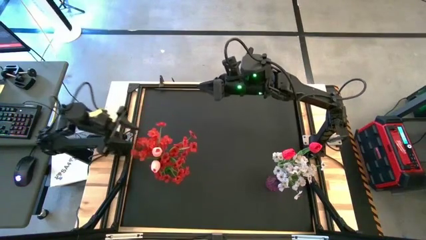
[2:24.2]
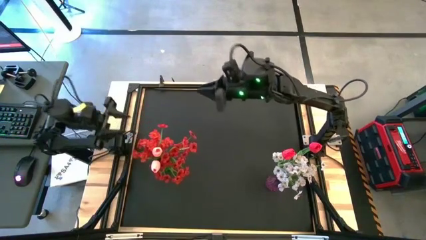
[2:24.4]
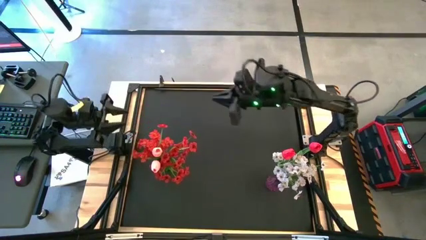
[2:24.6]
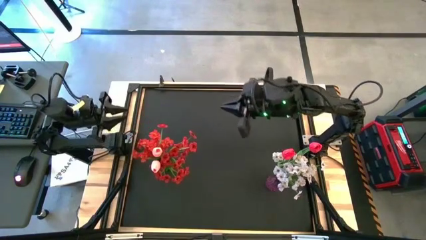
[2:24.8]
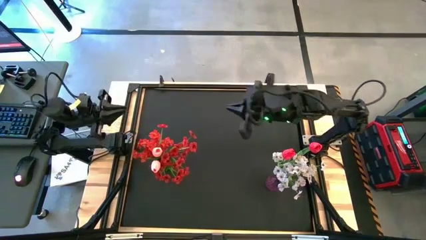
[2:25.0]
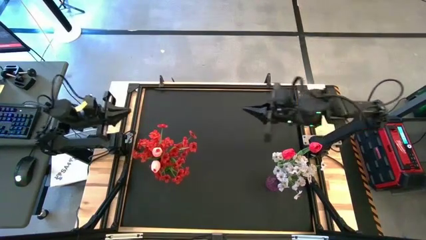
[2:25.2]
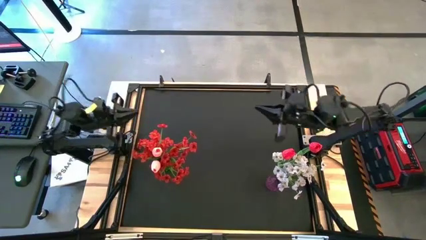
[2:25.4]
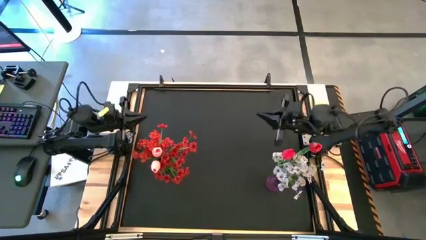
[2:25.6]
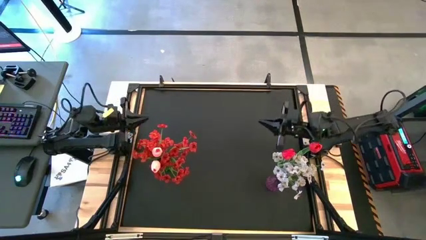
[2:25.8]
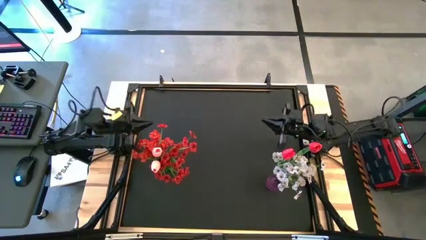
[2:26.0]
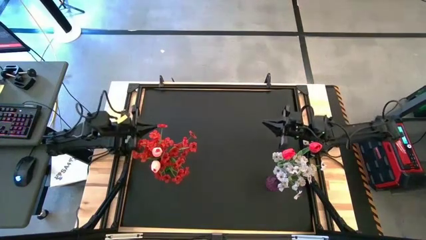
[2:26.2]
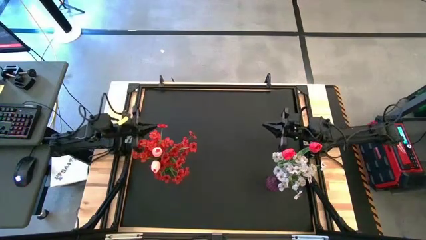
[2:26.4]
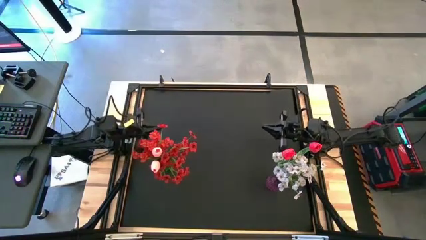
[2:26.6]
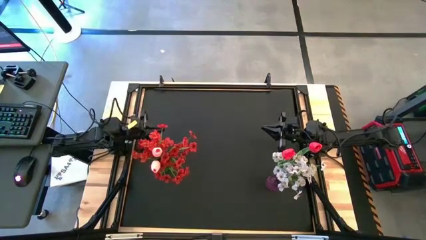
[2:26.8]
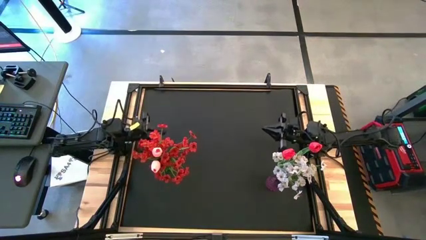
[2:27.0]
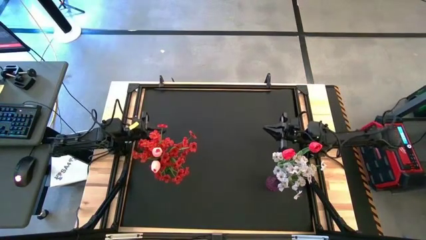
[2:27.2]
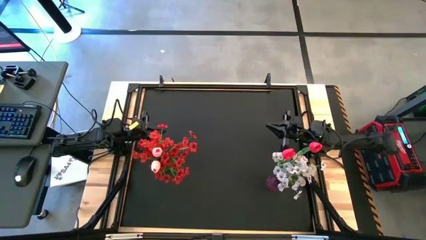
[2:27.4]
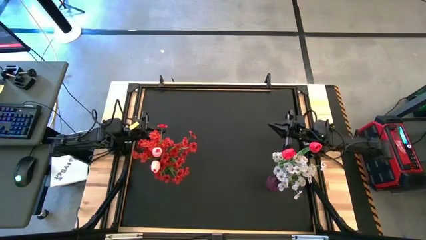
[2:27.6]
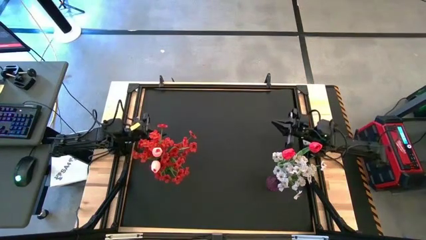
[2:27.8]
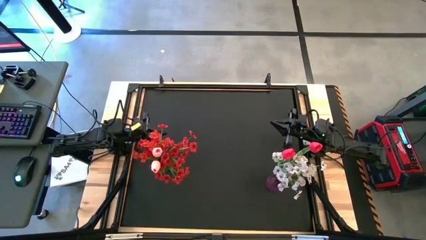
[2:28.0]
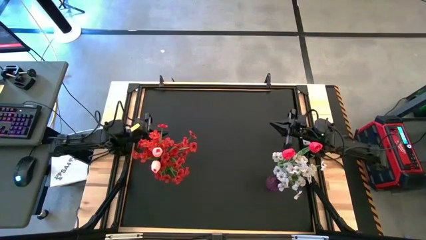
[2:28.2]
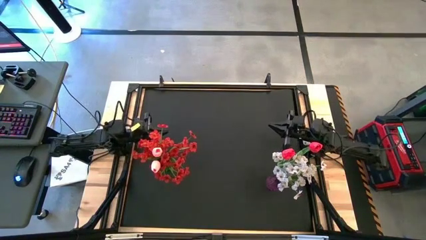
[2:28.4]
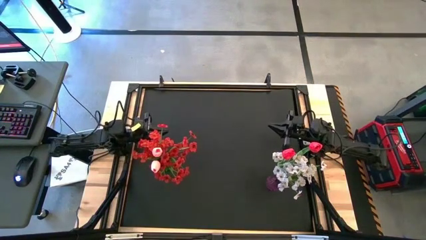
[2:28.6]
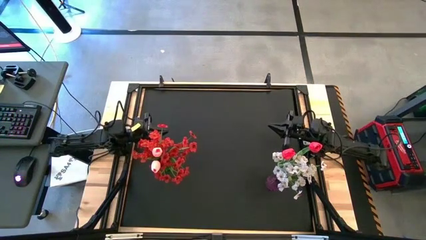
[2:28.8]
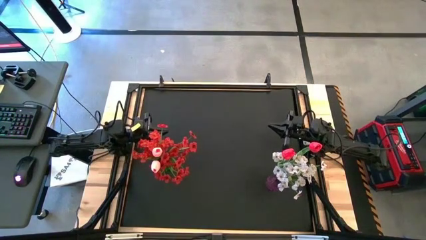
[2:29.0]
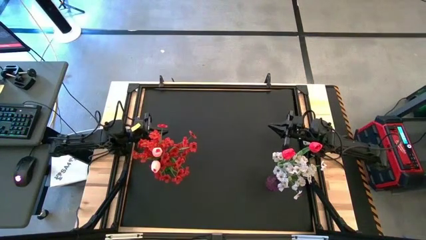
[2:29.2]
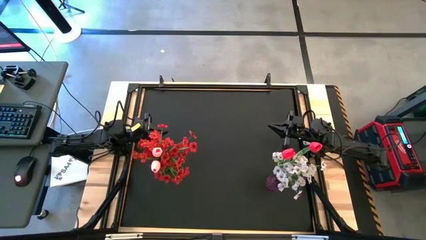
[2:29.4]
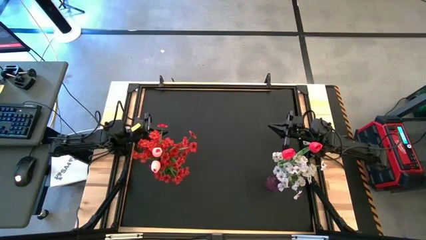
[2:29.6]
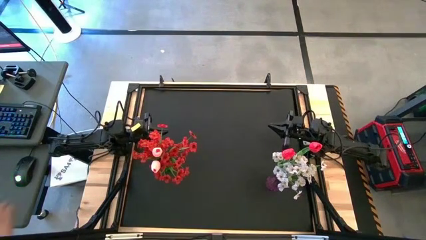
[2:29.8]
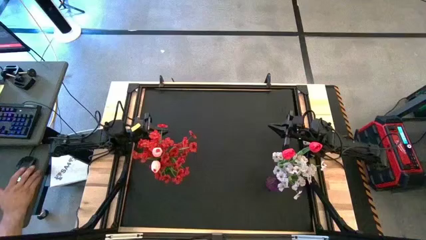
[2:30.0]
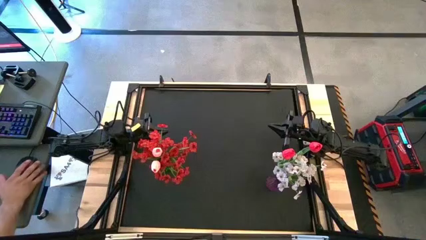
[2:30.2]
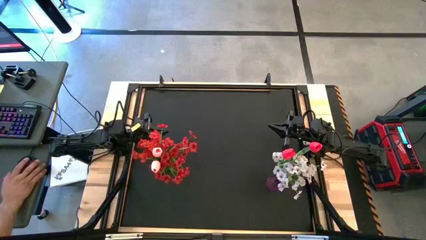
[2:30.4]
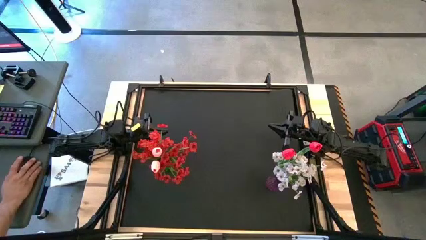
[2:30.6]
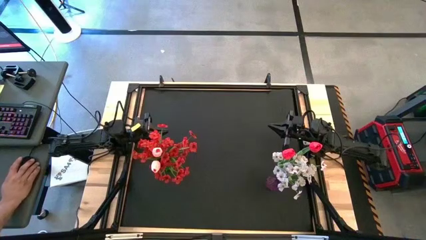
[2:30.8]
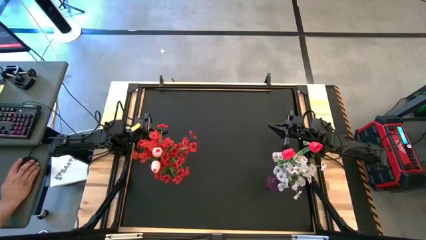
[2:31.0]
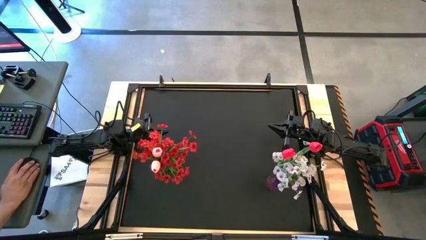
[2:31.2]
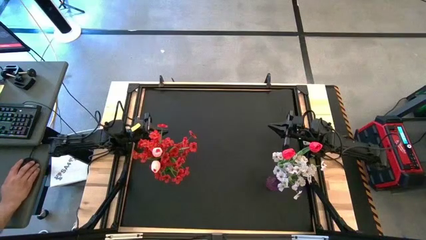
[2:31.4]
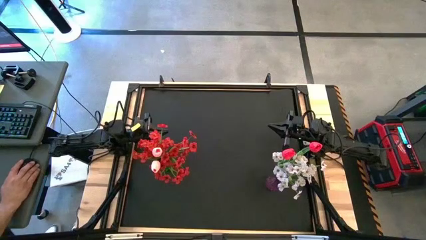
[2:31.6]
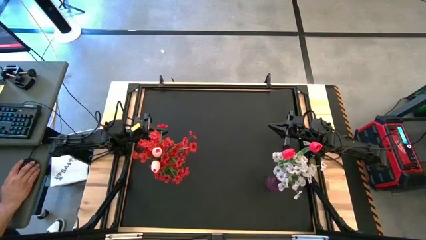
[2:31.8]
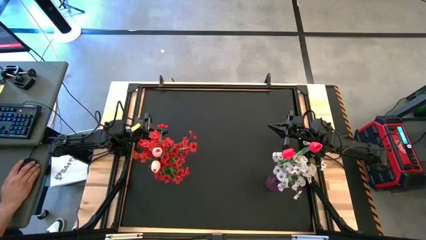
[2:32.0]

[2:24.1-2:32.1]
Task: Sort flowers into vase by color
Return to Home Position

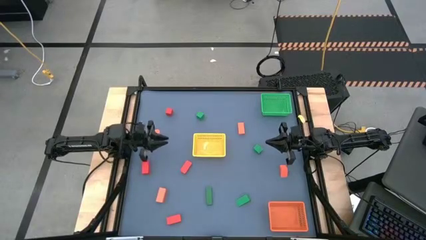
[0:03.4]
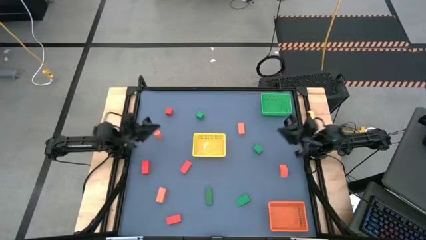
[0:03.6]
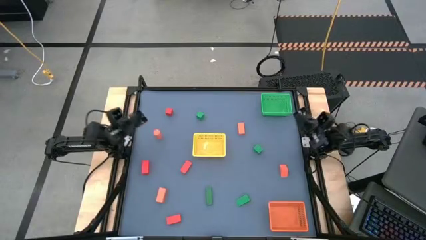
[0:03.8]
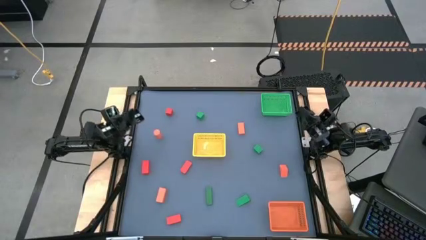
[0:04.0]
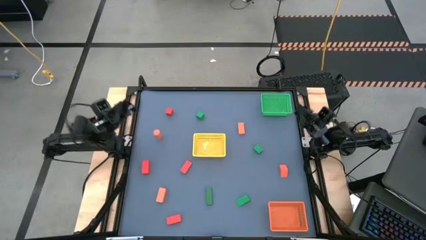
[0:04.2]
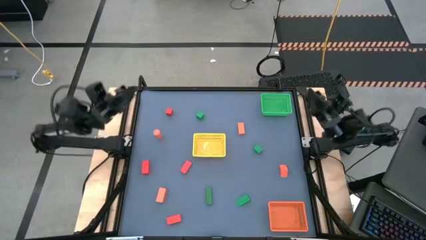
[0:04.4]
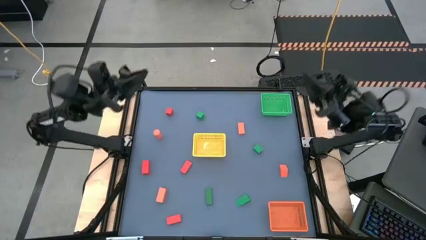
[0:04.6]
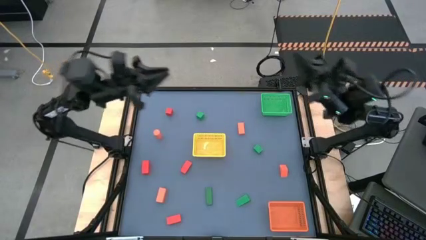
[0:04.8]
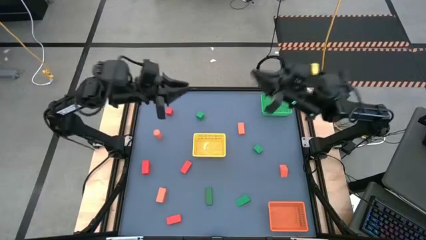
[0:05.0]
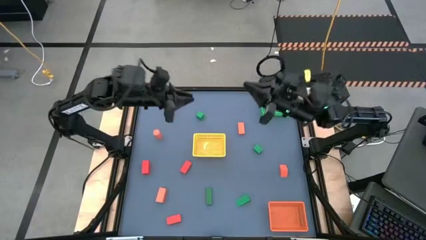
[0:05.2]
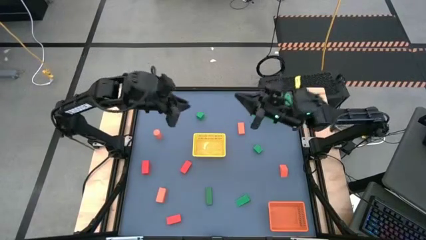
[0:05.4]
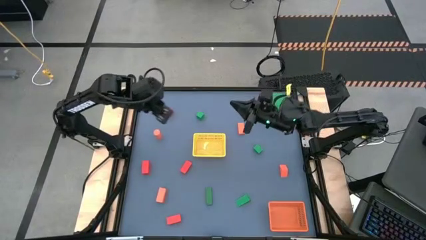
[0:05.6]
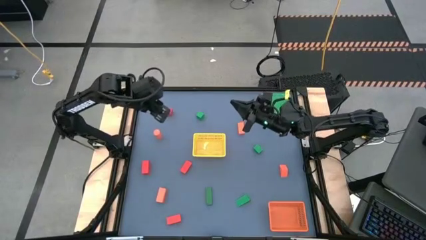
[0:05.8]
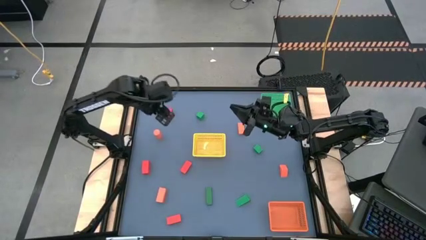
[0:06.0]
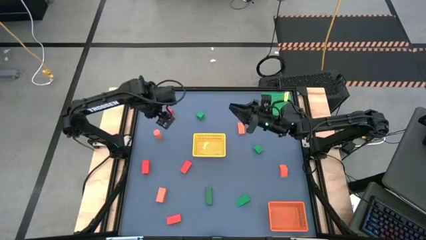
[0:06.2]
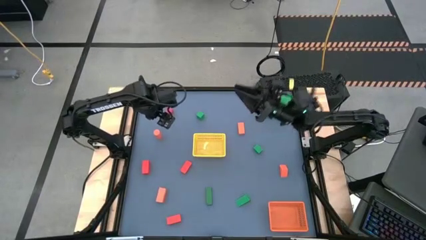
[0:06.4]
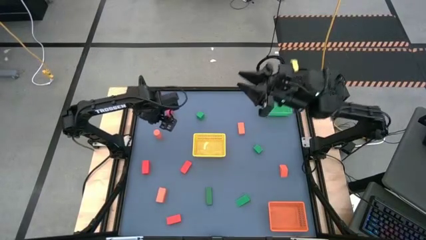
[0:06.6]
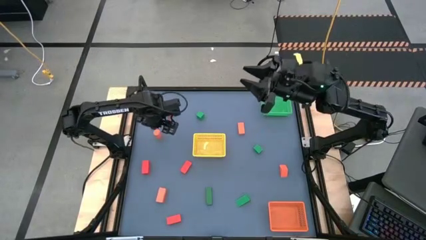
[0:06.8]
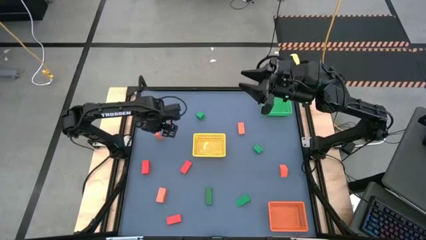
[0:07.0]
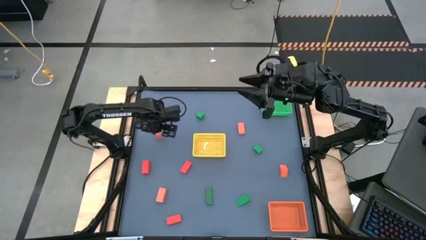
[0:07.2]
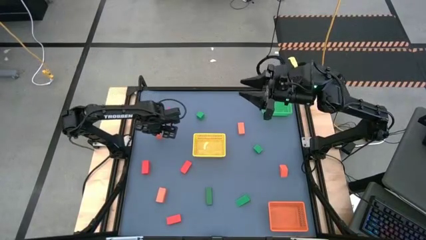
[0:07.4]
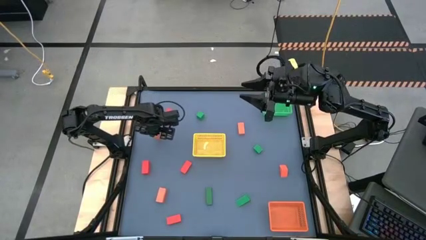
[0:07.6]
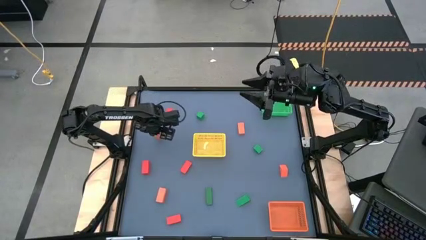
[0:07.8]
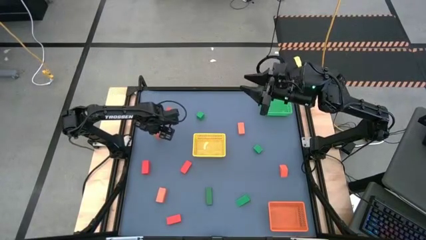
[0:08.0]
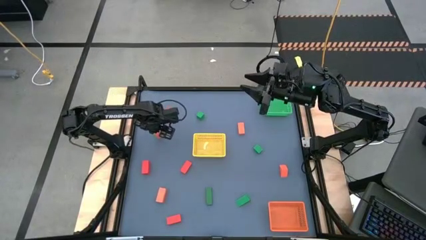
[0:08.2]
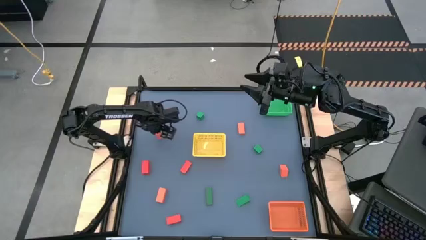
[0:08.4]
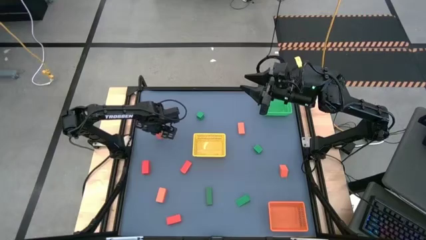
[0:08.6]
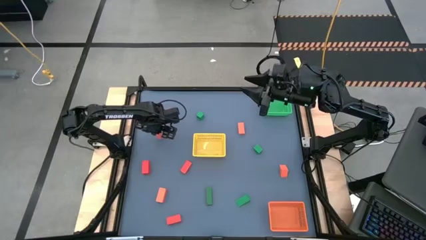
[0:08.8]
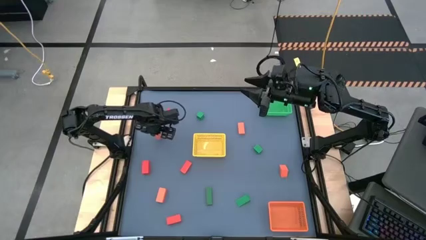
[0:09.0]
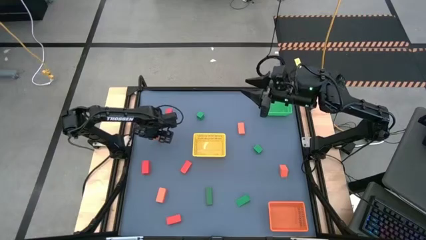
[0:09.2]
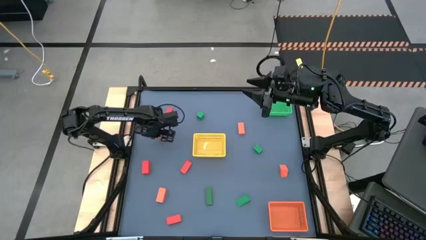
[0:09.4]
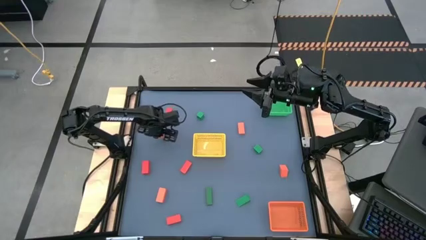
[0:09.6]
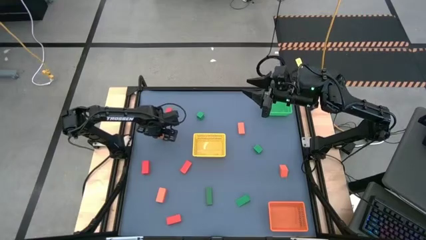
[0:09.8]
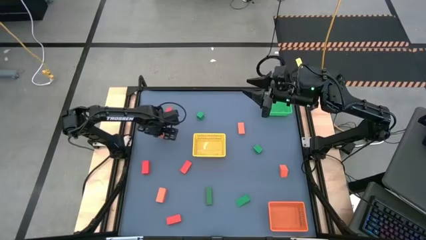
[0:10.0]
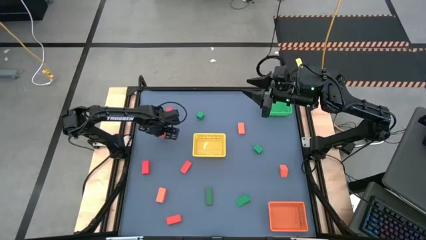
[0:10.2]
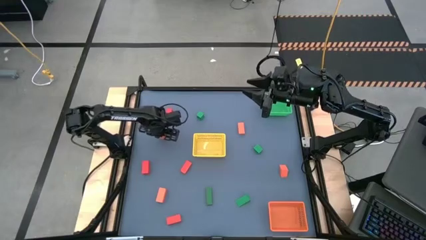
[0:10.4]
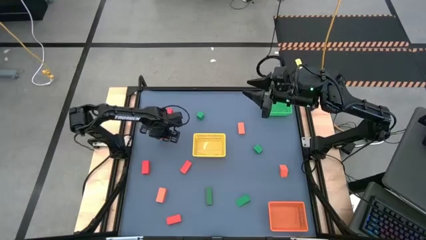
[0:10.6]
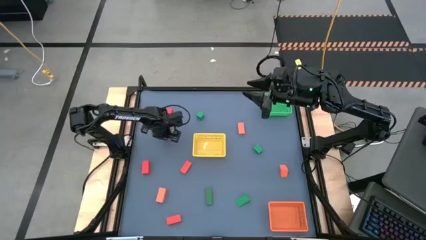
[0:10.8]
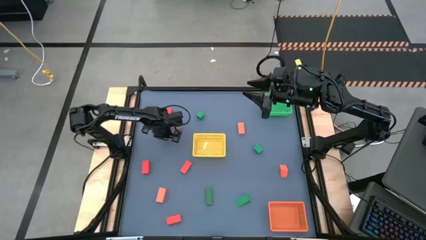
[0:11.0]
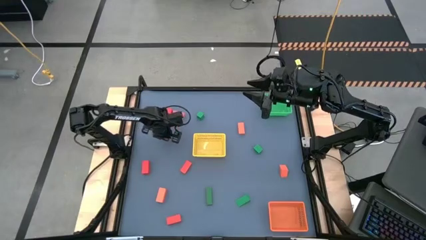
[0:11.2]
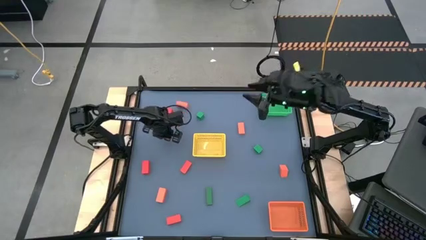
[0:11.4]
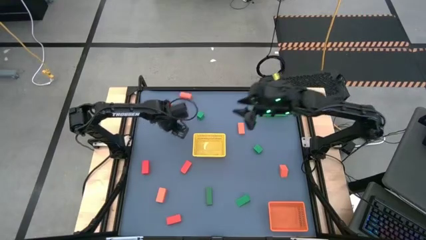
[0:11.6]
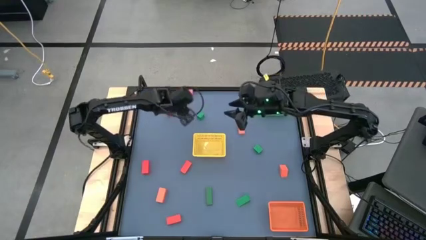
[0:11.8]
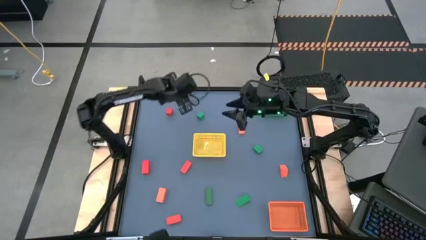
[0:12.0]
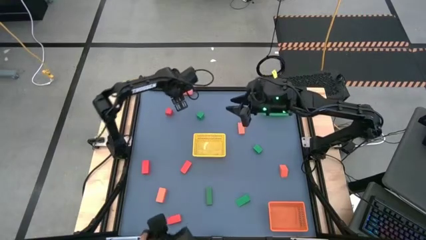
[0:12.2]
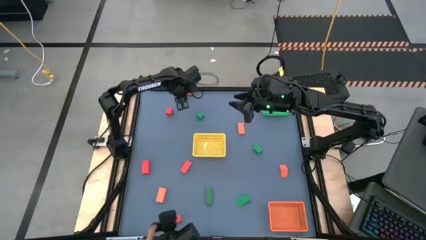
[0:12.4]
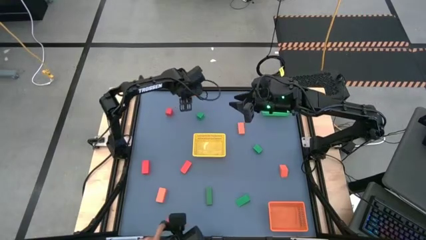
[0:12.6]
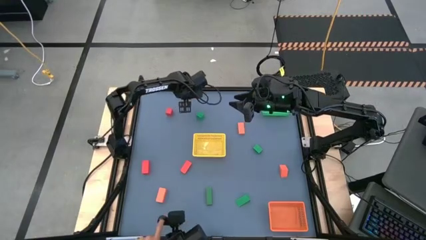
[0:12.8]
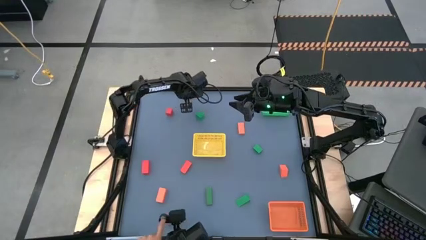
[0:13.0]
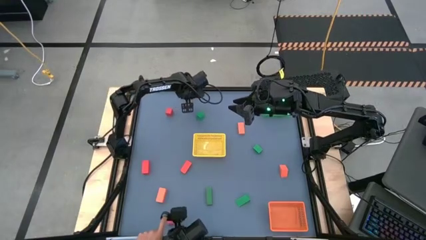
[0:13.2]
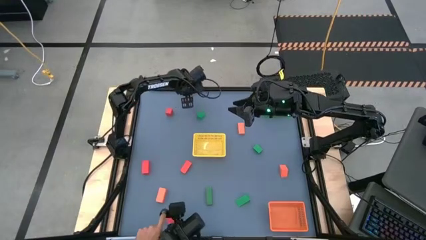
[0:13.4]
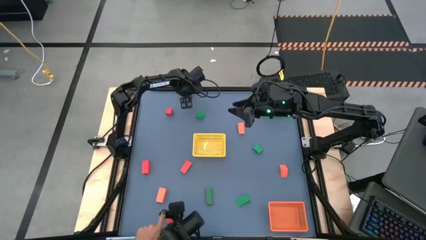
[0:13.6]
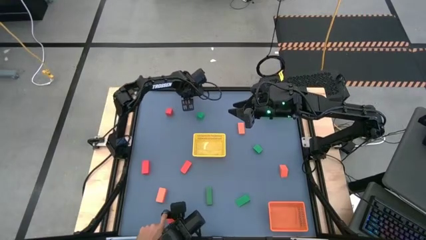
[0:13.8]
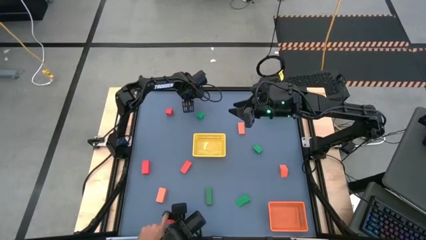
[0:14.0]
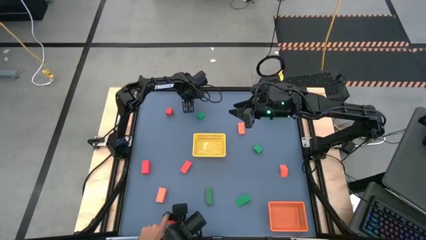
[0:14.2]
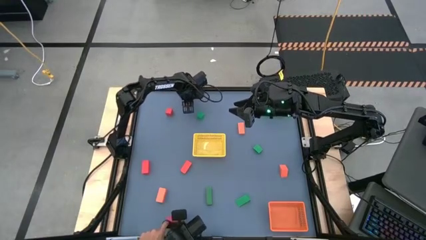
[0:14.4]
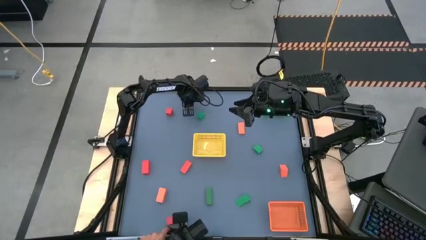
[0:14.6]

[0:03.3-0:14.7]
Task: Sort & place blocks by color
Put the orange block into the yellow basket
